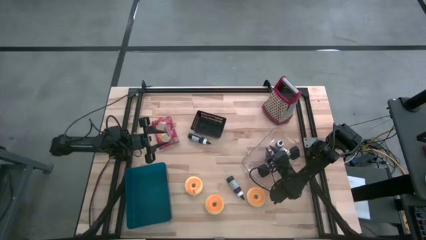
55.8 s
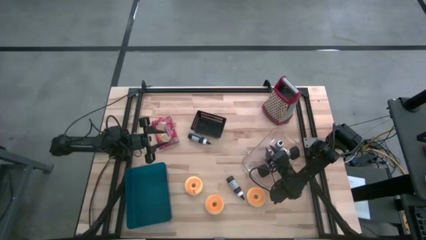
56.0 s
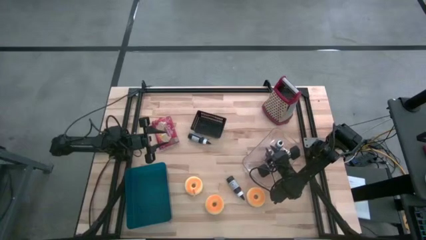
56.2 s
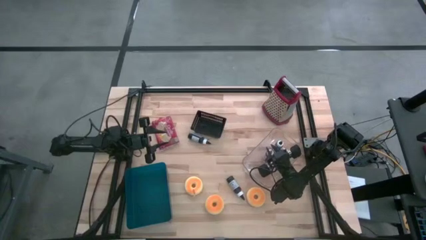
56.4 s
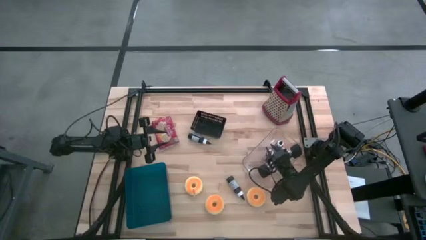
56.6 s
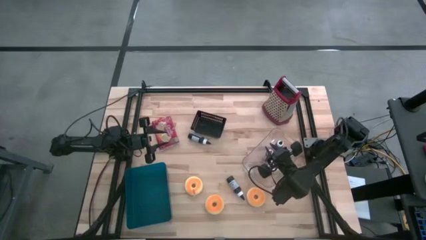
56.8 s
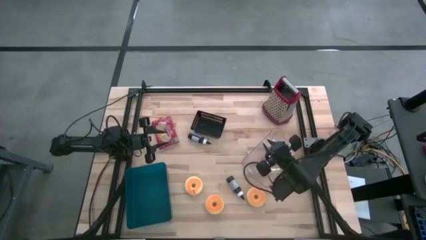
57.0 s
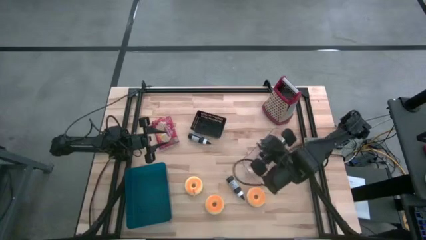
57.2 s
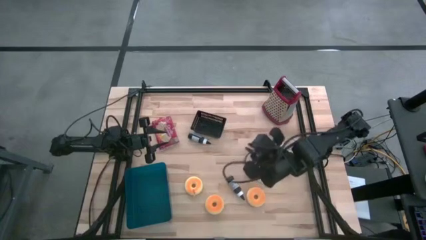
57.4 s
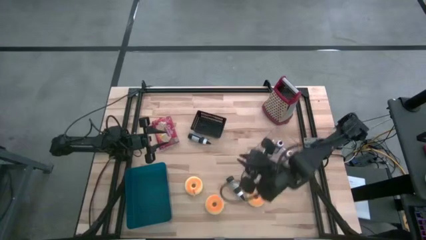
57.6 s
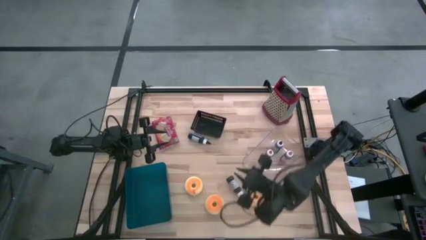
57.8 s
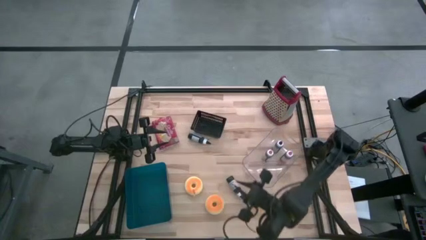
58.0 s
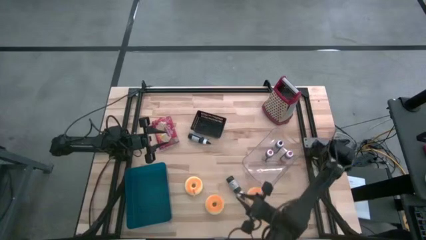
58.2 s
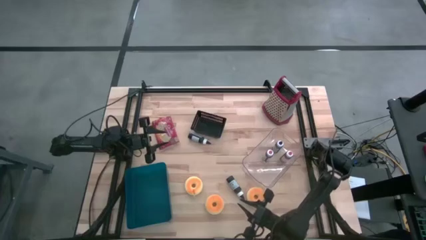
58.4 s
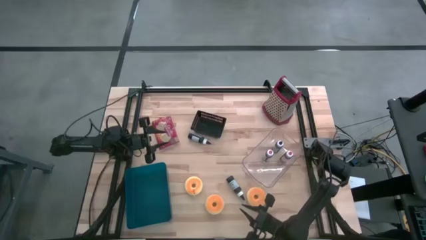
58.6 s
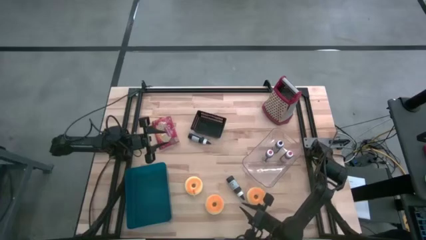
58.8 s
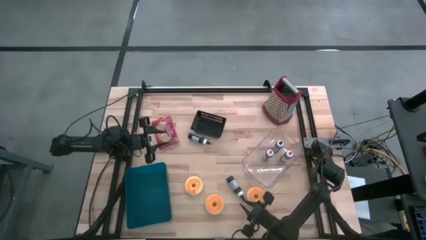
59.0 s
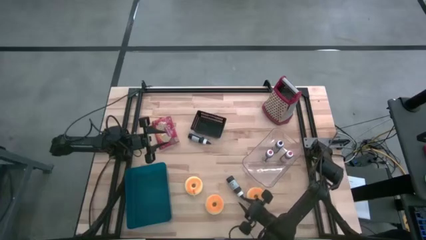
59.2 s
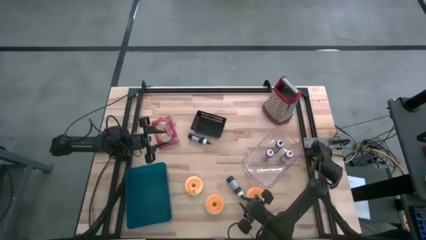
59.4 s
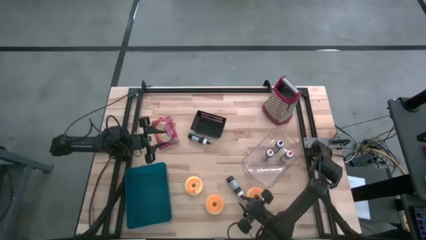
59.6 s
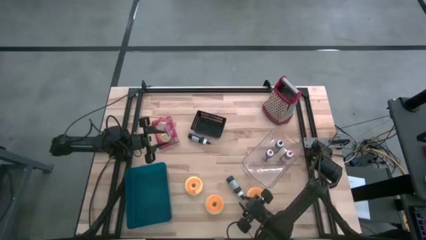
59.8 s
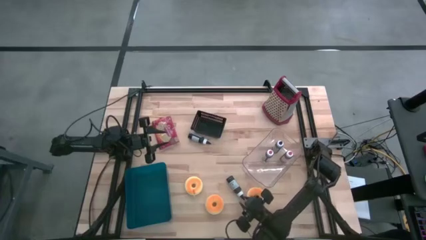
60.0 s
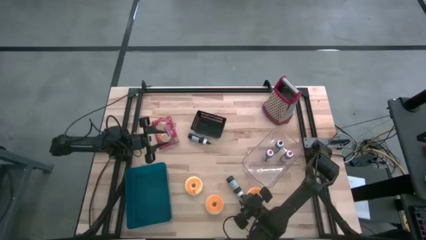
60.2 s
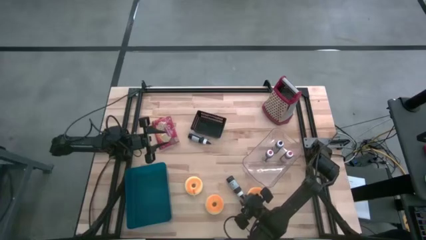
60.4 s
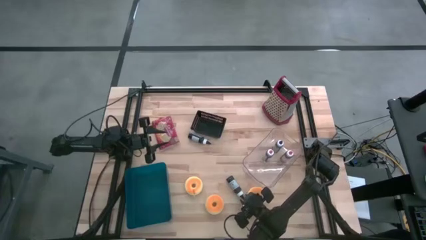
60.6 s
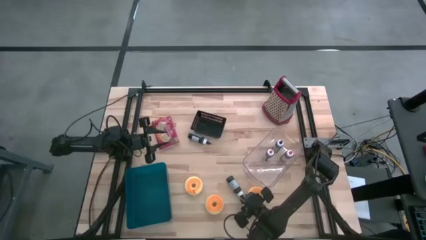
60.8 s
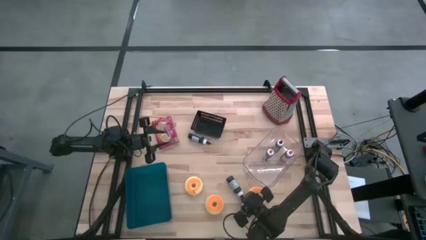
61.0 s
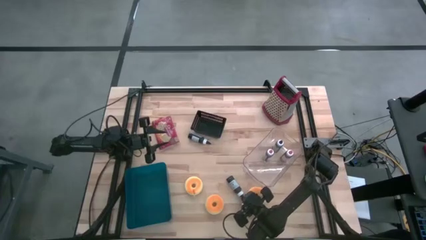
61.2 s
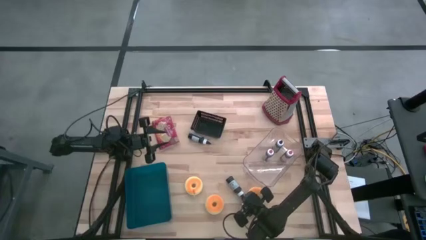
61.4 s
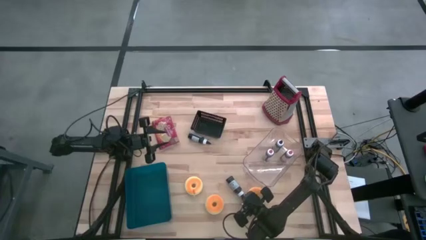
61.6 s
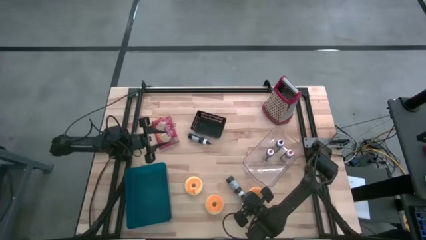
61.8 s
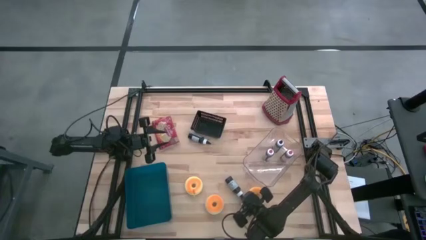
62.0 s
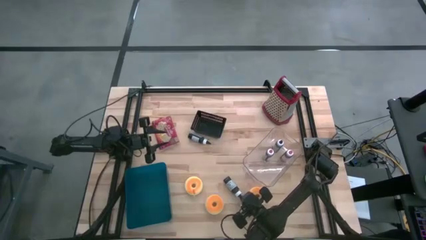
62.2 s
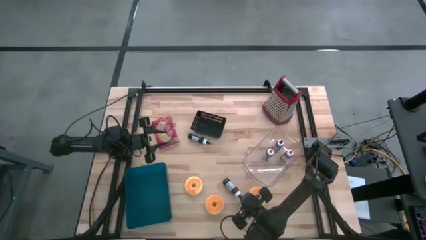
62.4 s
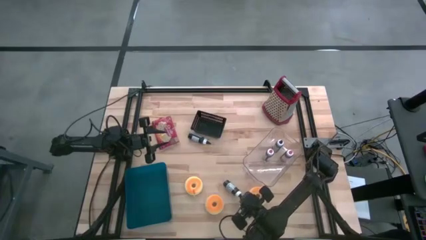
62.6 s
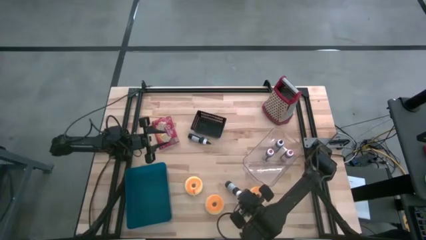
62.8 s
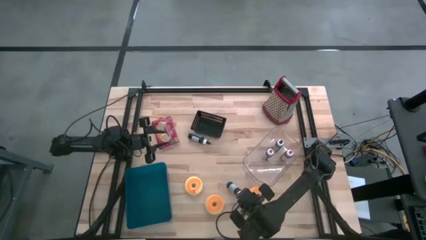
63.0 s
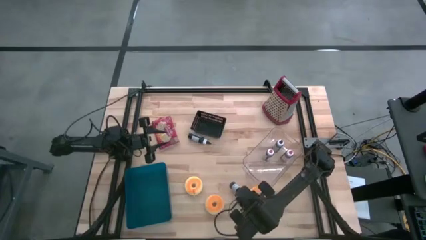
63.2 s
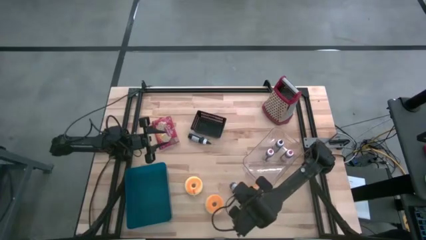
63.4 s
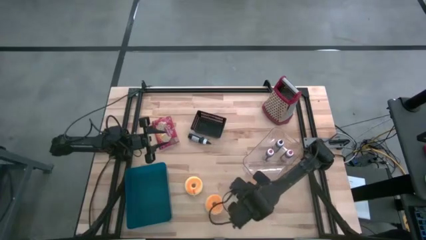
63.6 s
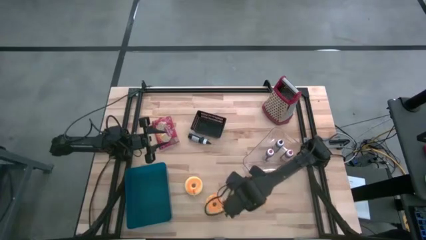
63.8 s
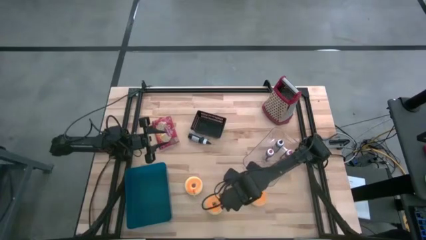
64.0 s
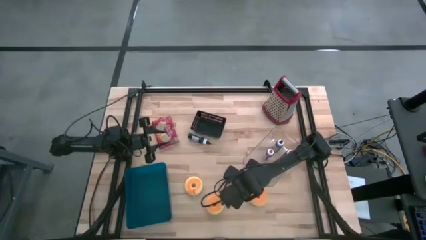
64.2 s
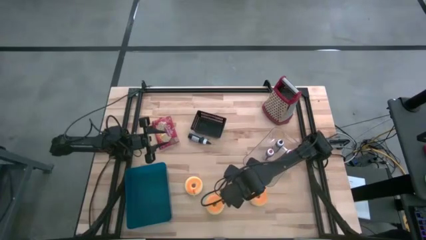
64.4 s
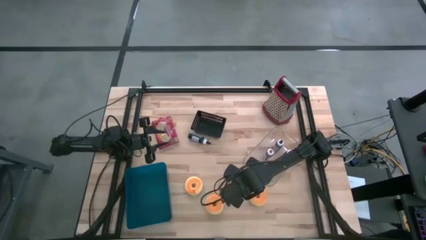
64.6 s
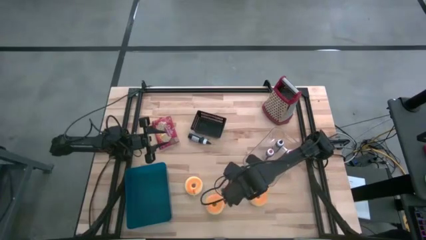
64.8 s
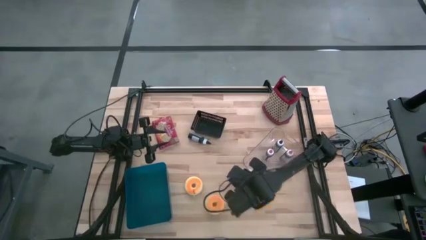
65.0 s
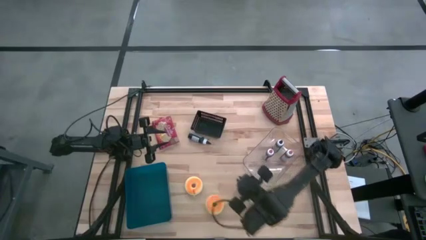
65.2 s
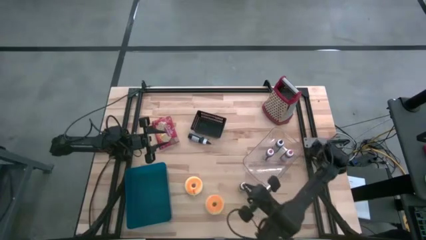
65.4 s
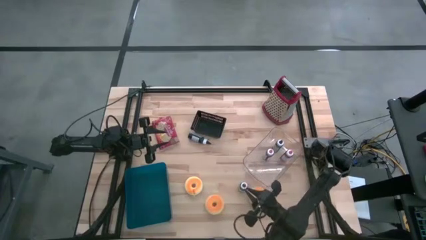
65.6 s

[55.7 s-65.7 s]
Task: Pick & Place Food Item
Put the bottom black food coloring bottle into the transparent bin

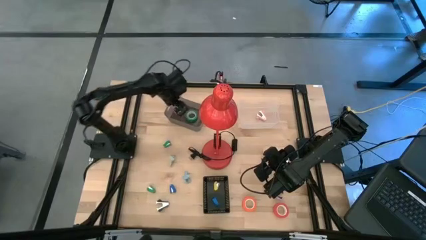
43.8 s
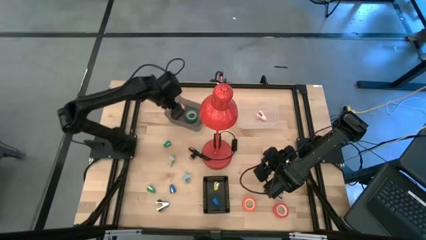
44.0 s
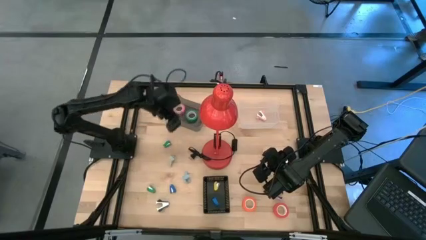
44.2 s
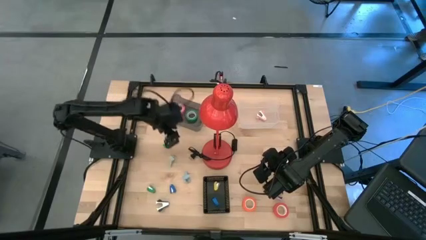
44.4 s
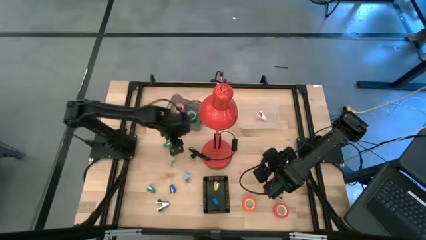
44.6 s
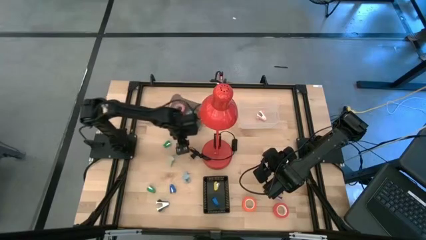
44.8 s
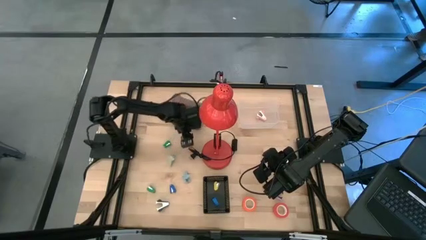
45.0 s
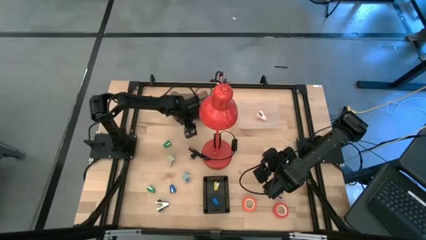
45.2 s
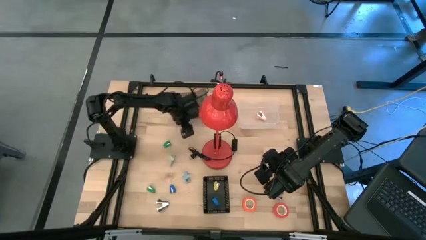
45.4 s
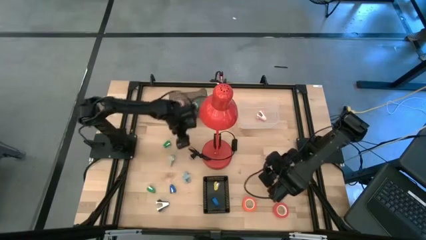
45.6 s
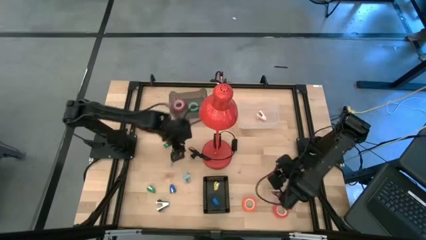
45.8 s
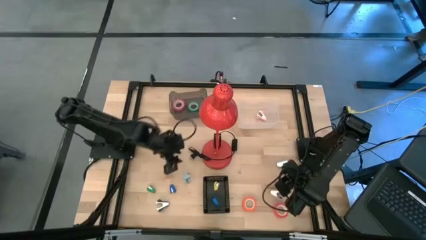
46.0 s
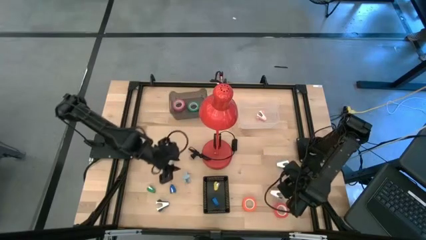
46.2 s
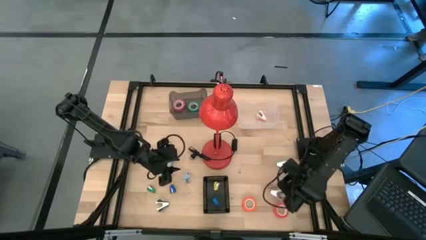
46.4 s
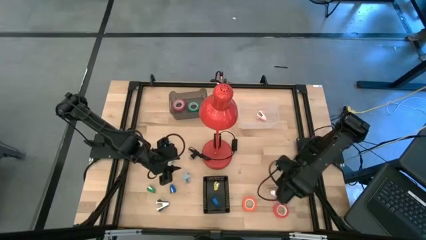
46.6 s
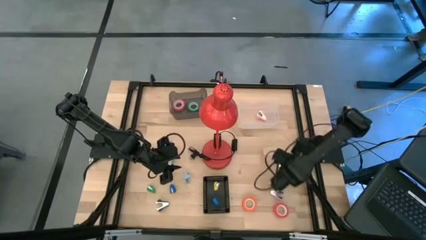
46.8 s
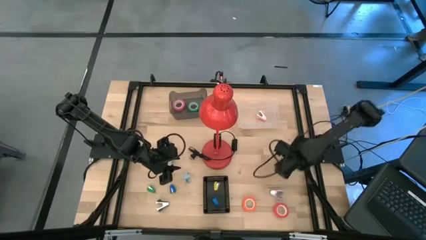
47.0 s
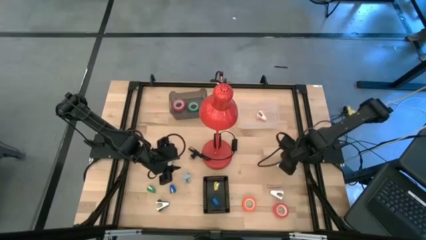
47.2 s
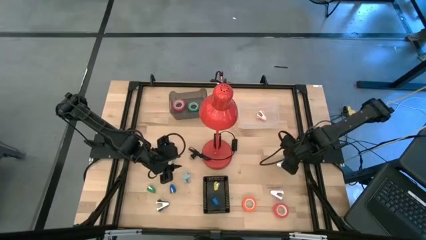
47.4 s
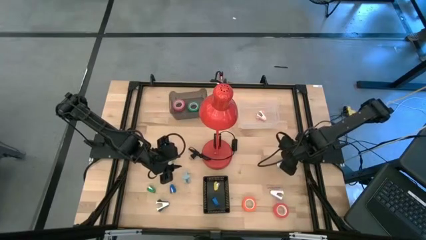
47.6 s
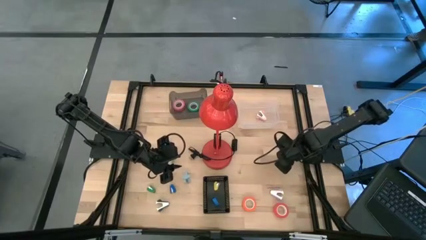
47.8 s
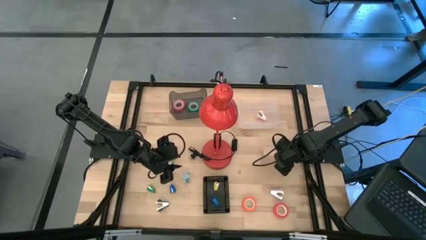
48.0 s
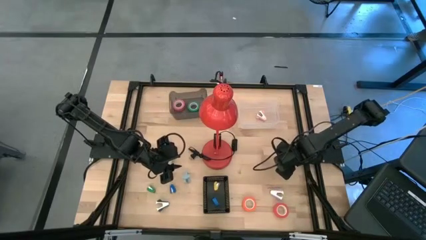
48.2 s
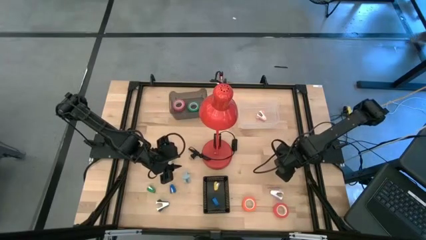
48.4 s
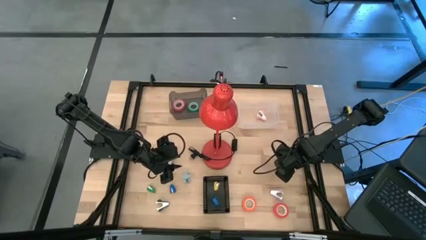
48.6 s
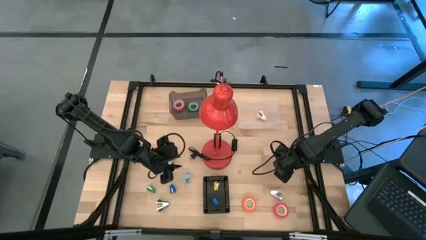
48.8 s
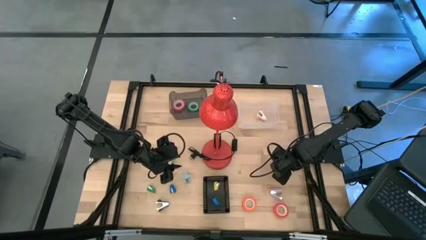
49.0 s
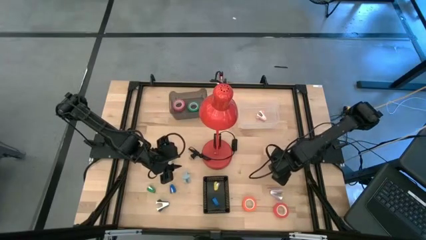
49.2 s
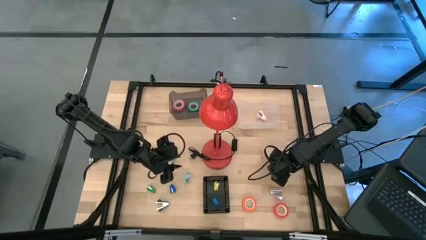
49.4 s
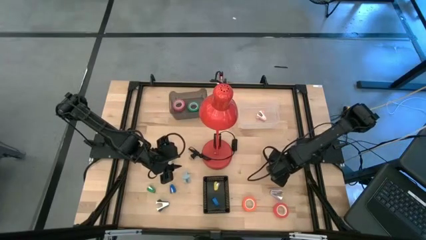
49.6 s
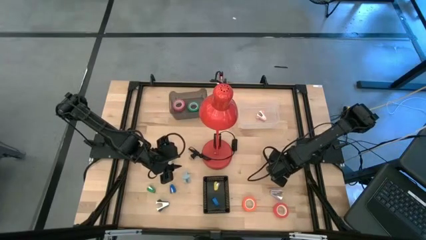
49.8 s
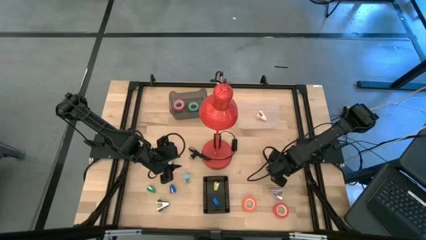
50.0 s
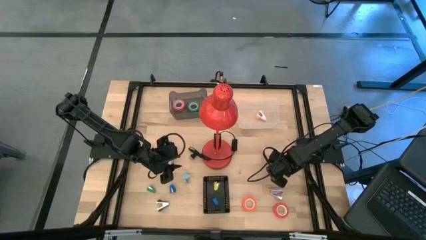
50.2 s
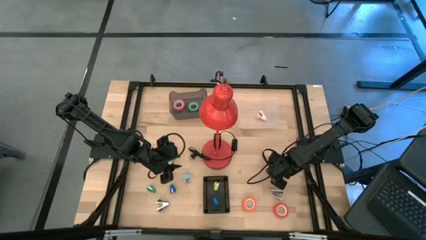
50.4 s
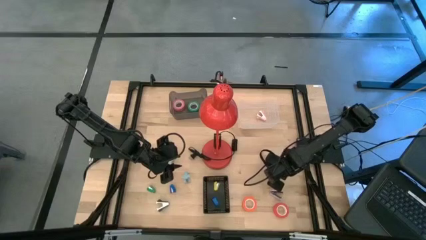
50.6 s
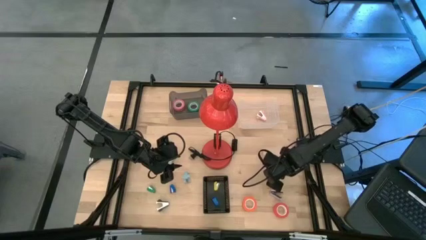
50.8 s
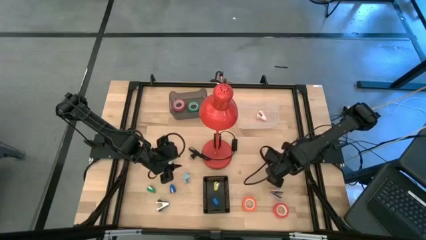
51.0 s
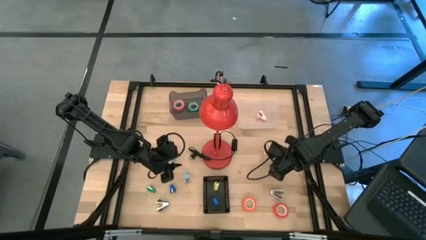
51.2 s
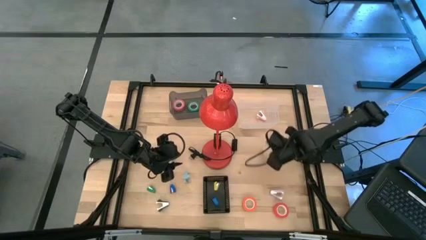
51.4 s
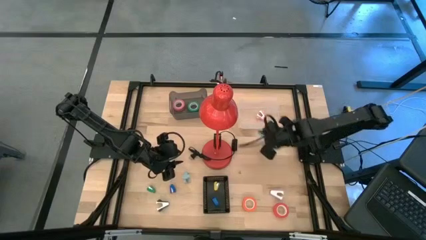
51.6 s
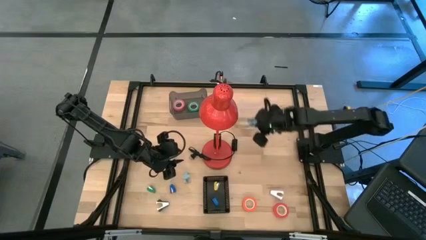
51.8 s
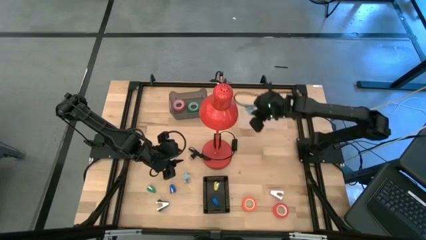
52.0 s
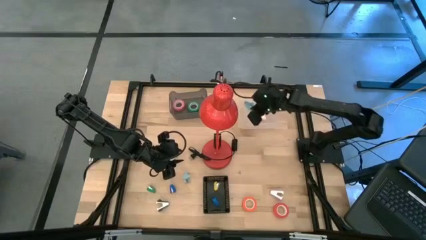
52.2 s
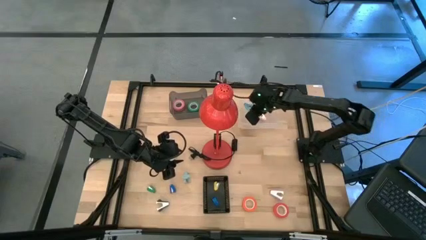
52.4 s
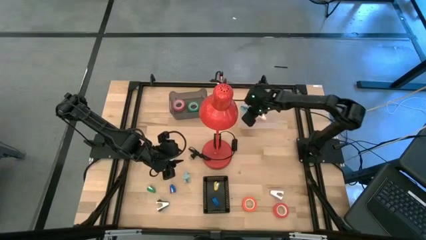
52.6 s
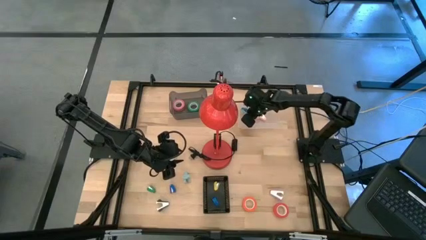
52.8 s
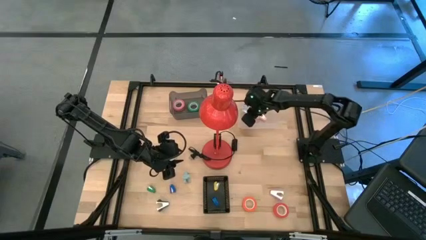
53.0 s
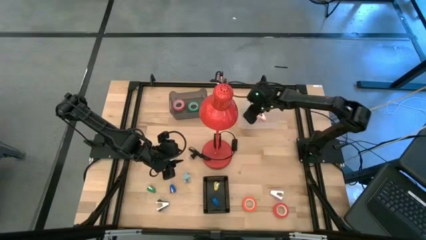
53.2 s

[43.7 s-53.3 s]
Task: Pick and place Stapler, Stapler remover, tape
Put the top right light blue staple remover into the transparent bin
